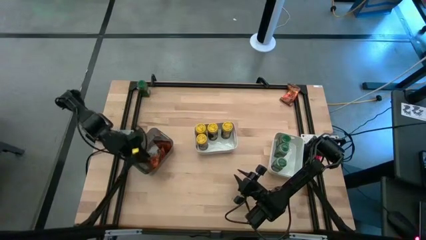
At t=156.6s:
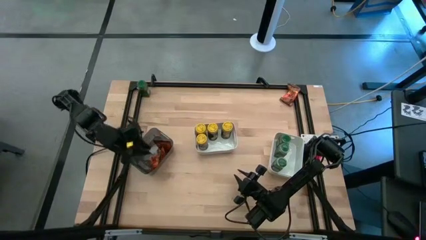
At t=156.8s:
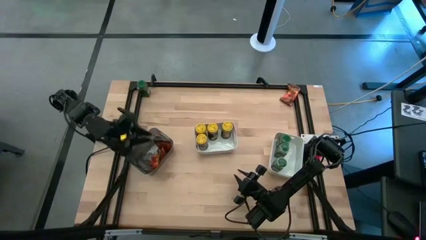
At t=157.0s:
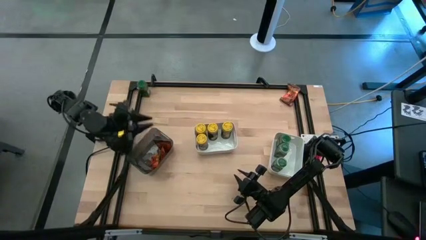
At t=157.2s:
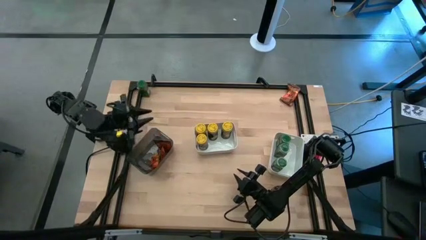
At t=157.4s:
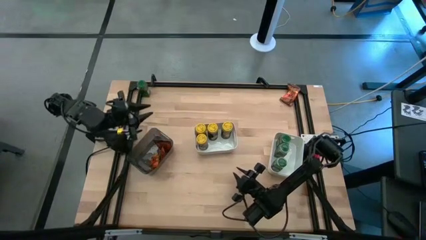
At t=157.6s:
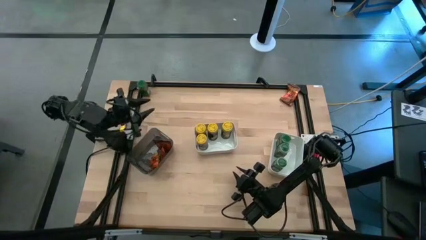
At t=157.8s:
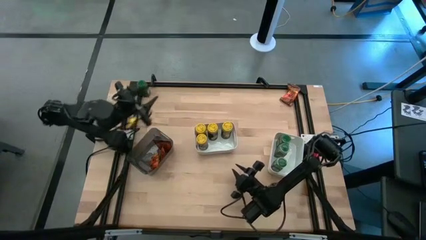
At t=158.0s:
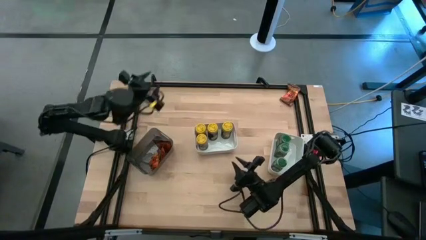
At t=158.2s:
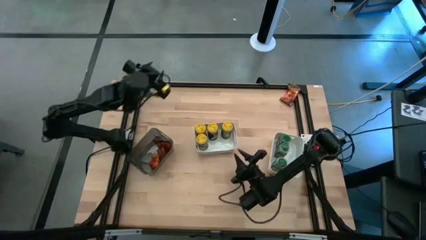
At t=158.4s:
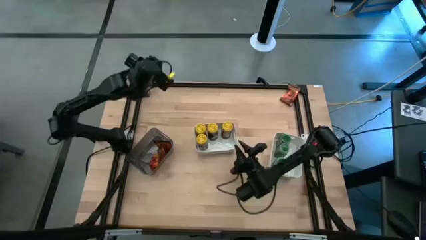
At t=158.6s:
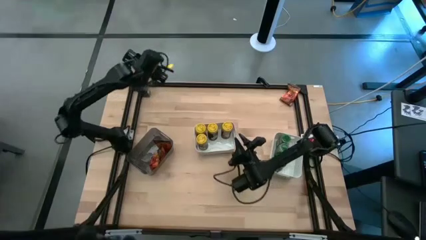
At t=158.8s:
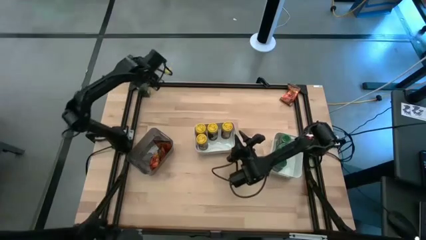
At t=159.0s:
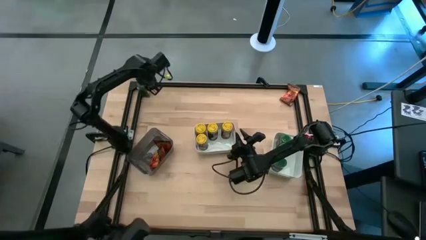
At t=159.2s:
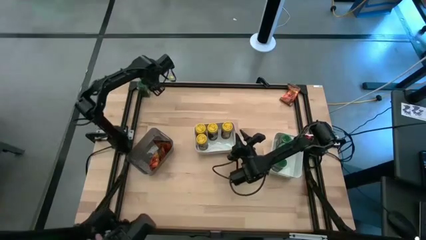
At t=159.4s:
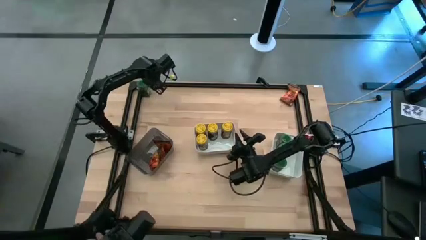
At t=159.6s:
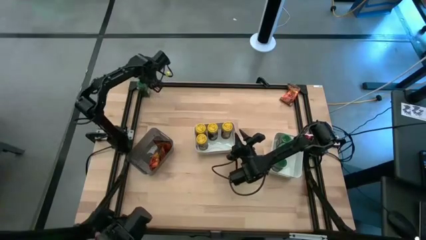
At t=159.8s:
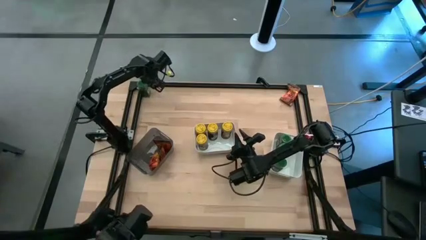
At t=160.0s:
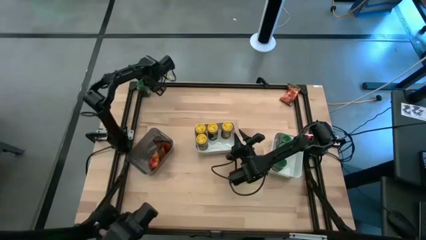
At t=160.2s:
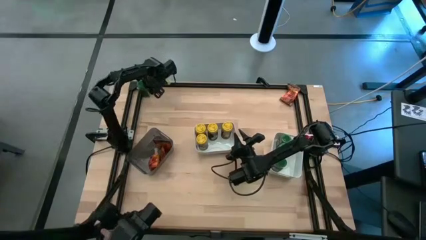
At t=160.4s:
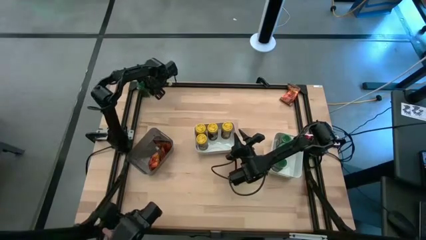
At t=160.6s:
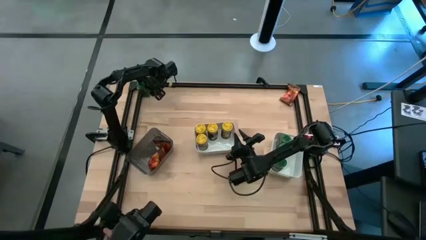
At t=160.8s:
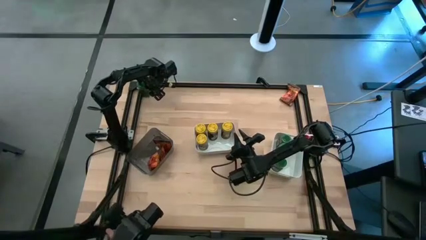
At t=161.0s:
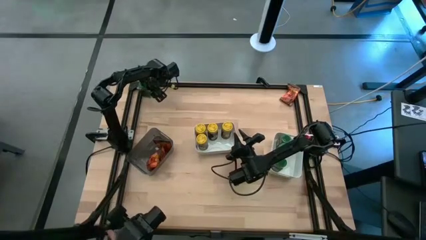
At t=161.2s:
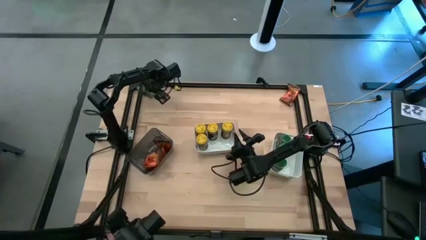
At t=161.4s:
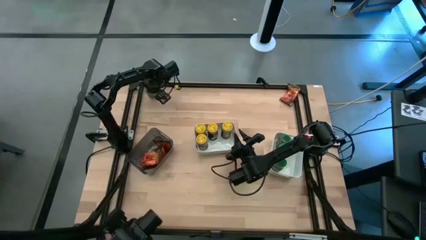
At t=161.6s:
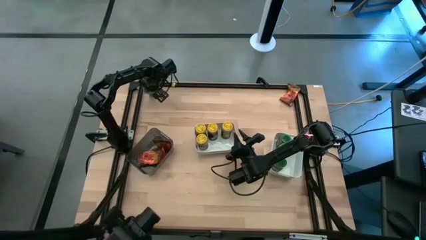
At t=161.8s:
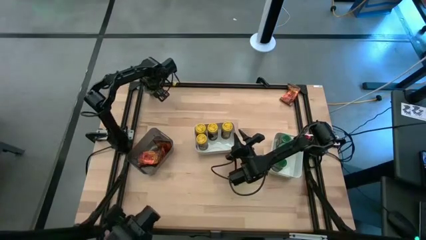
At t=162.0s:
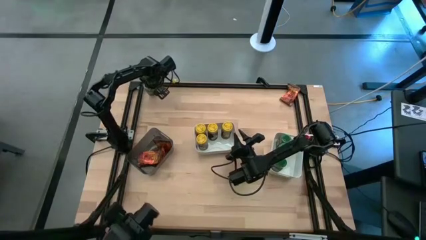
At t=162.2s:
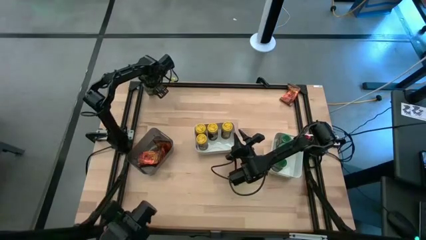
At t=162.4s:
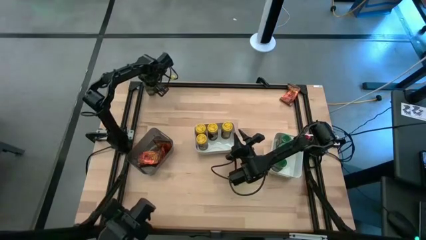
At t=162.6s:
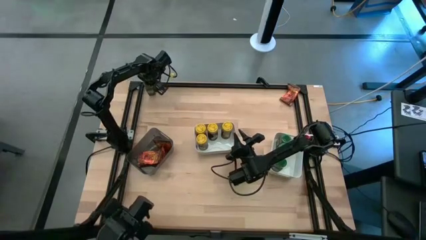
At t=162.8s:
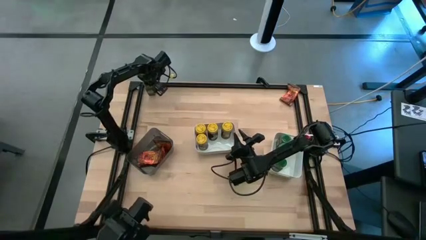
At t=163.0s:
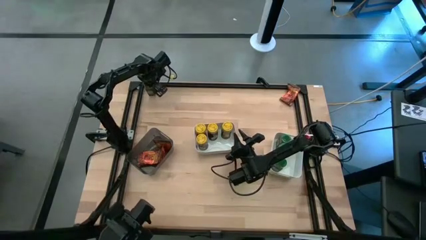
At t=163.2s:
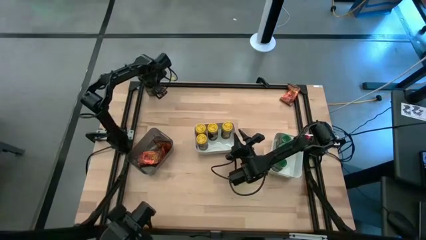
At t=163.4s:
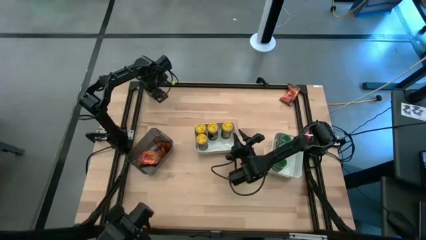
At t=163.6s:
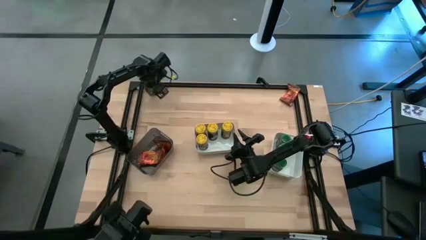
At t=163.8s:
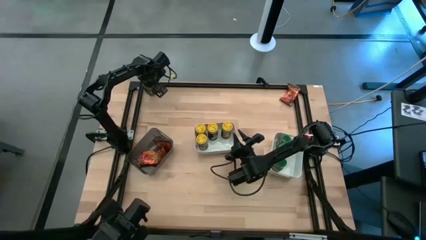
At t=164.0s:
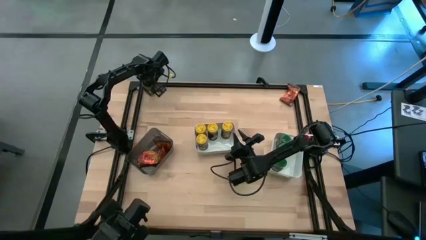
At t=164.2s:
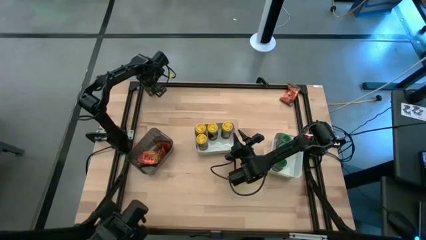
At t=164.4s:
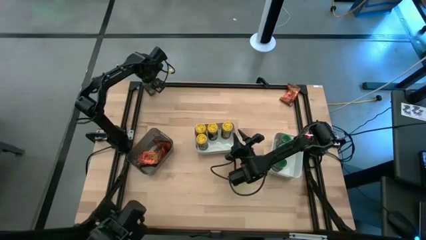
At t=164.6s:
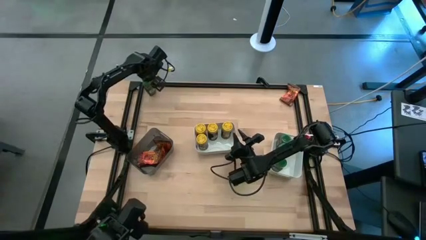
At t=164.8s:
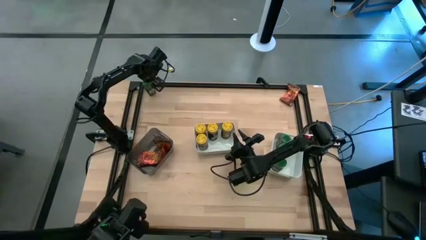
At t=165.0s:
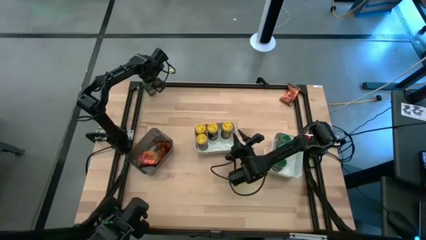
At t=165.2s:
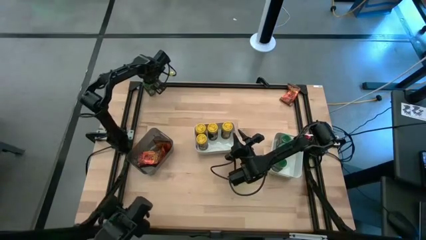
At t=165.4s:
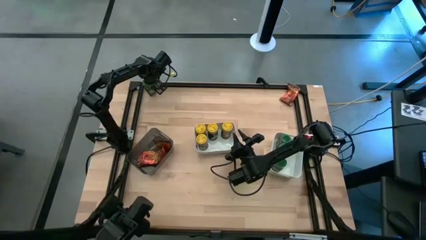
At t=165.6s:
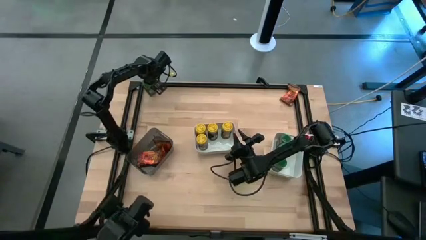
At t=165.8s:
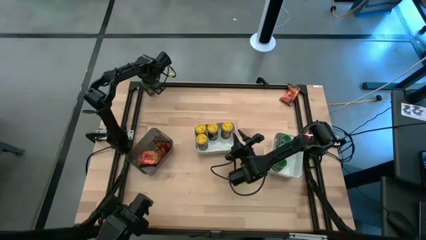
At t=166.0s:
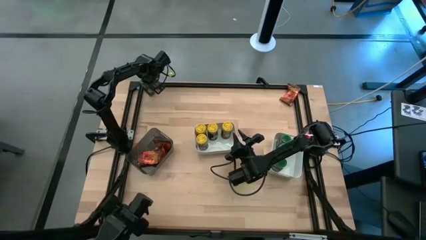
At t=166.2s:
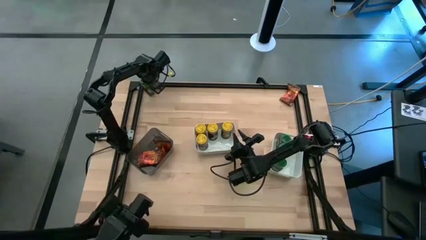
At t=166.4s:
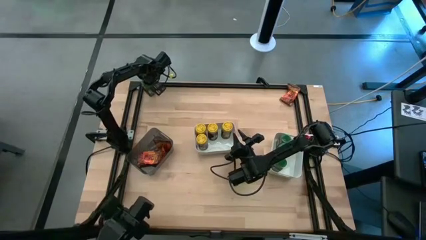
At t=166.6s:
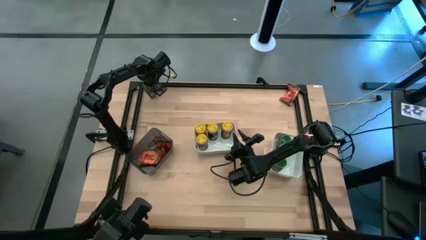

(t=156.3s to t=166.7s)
Task: Sort spices by type
Put the green seasoning bottle into the right white bin

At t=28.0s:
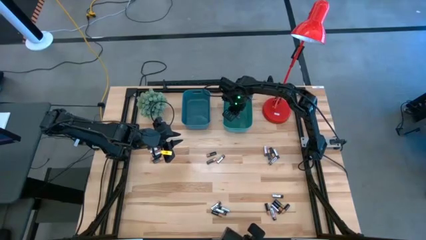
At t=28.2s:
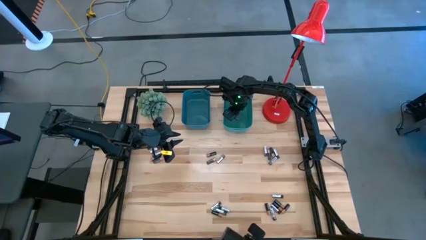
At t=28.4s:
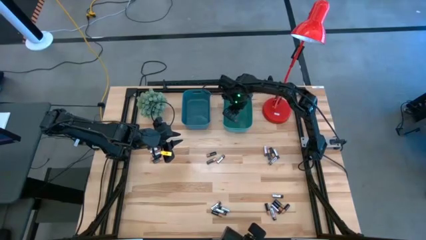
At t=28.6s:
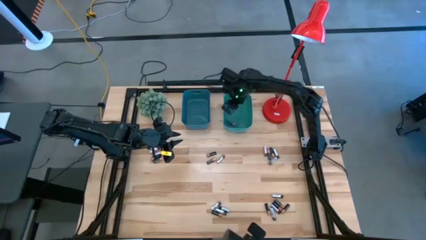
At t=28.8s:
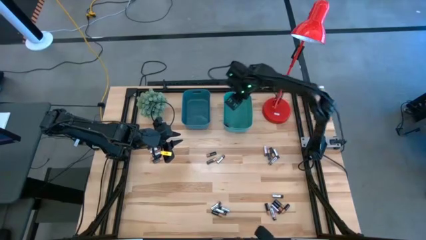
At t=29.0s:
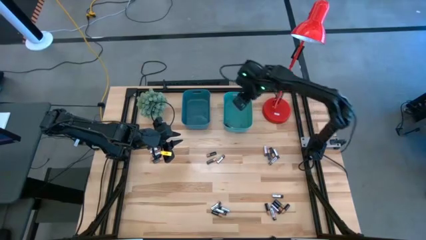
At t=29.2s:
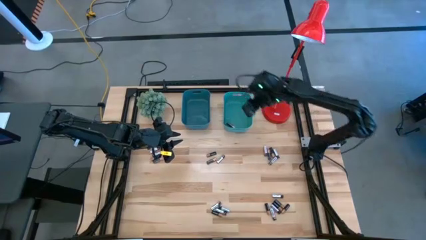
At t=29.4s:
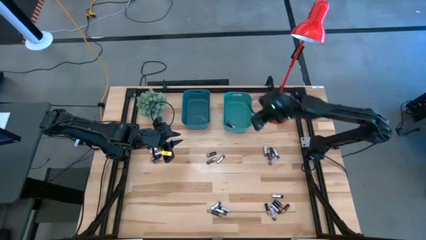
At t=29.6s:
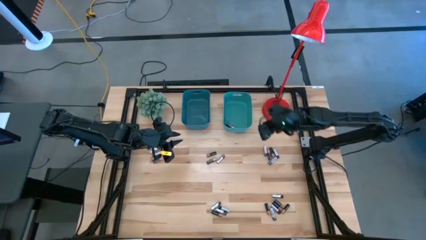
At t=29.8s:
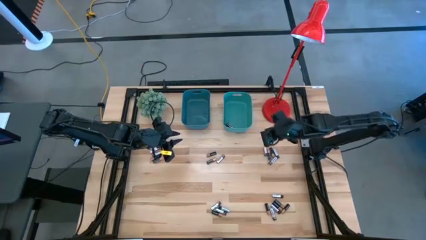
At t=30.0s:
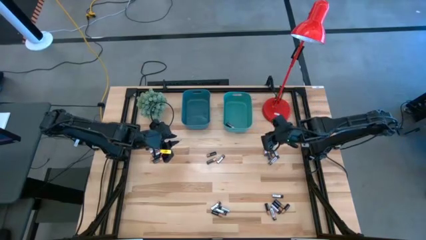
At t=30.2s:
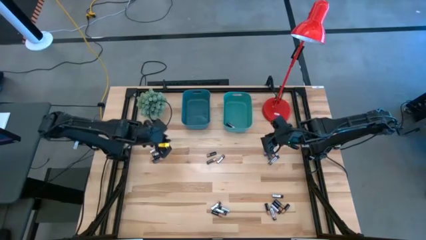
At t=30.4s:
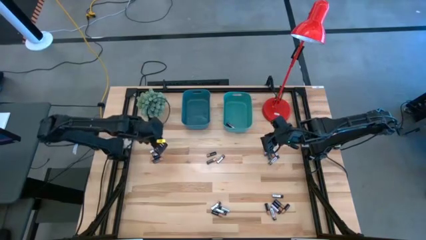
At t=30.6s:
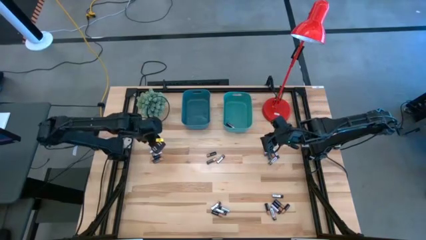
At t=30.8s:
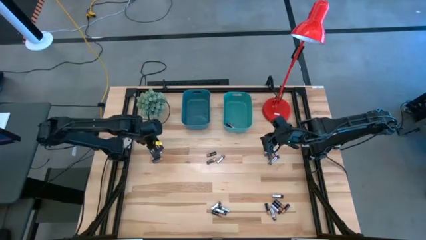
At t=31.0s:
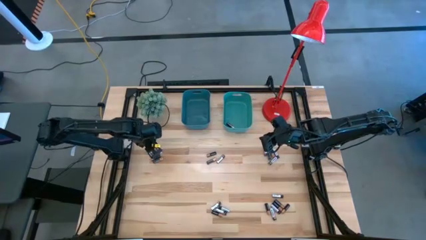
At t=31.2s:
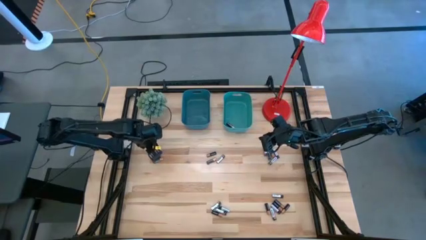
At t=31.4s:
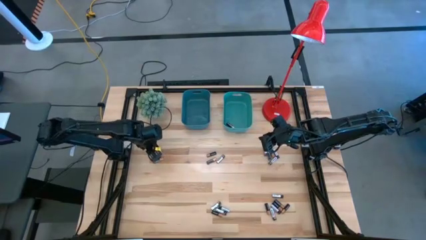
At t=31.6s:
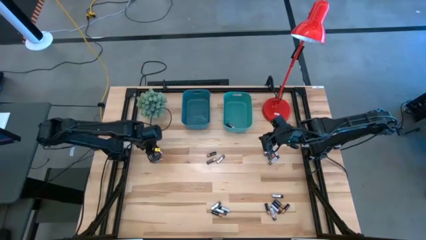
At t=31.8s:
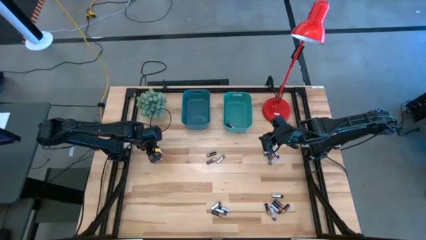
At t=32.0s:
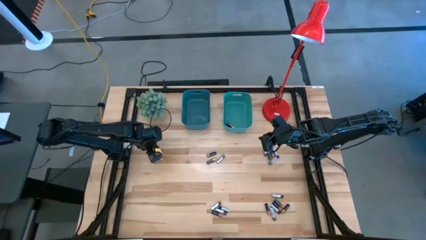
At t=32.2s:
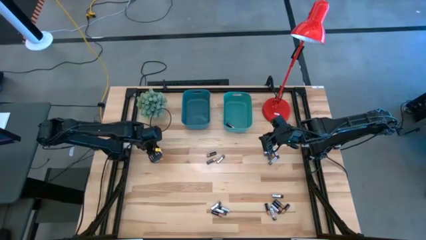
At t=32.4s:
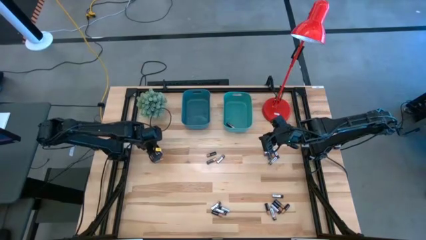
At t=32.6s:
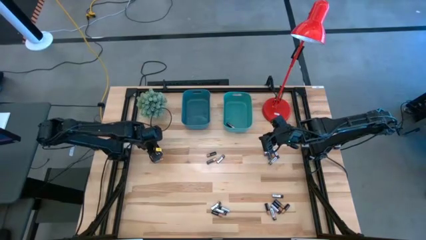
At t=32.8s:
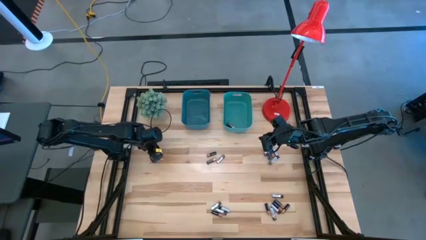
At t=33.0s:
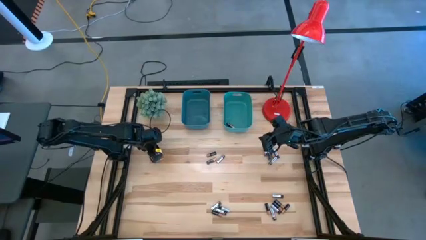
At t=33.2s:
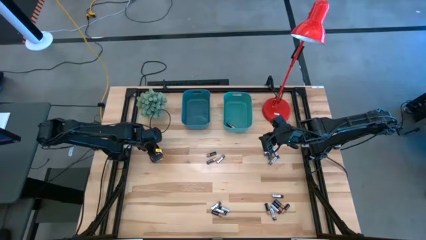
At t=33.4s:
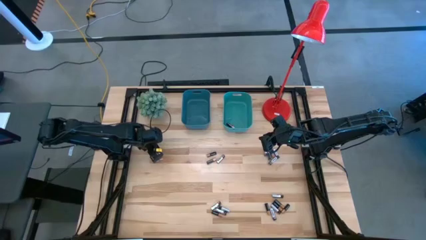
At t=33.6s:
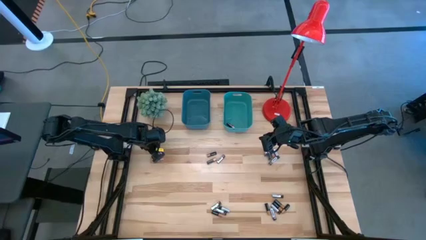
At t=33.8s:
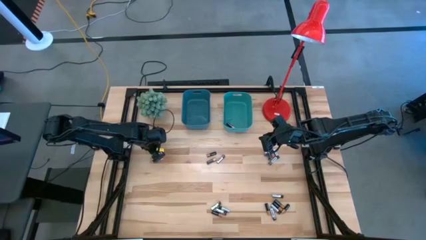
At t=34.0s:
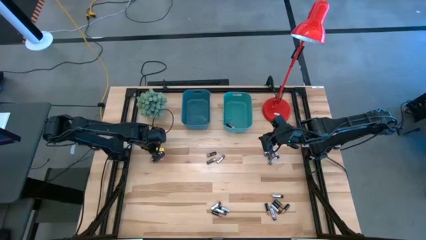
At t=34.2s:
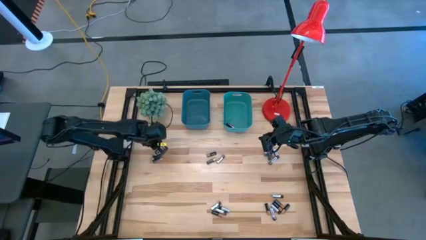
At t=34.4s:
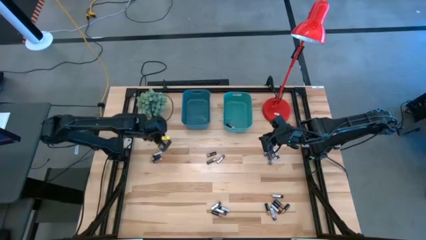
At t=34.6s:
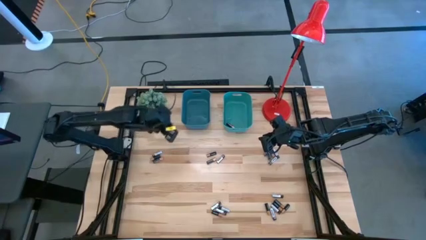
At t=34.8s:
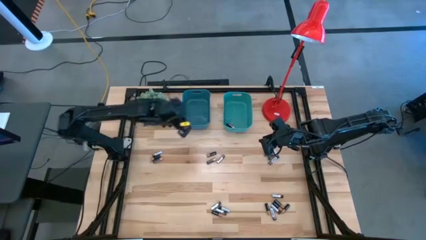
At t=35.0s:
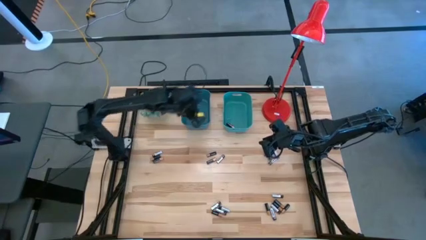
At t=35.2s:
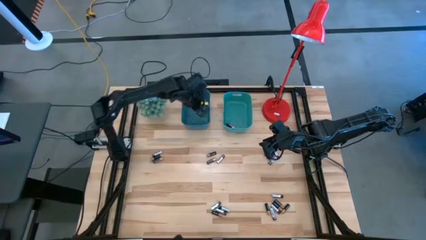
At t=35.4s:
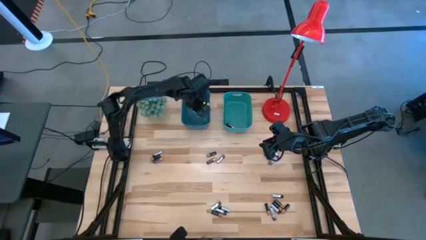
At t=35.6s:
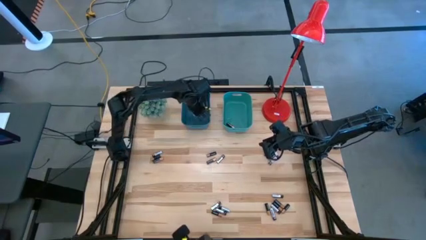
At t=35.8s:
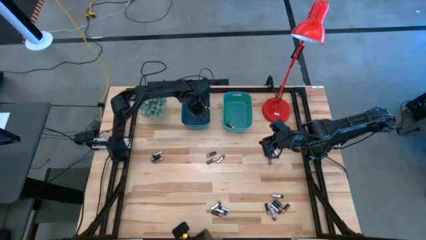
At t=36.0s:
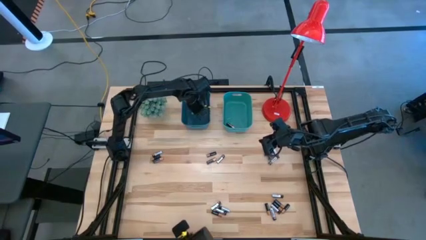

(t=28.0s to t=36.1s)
Task: Sort batteries
Put the silver battery into the blue bin
